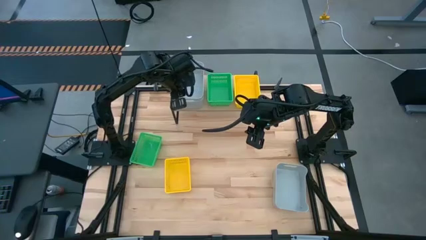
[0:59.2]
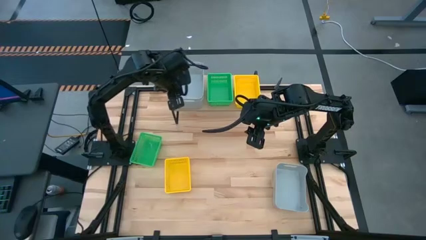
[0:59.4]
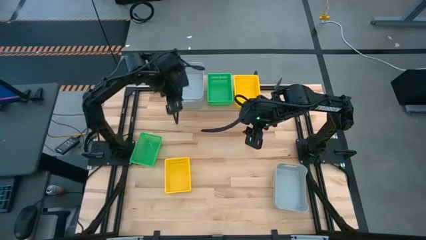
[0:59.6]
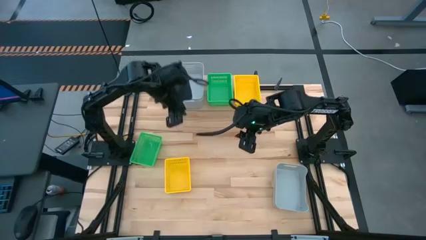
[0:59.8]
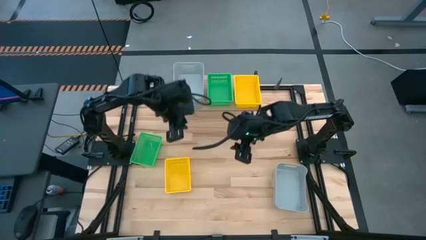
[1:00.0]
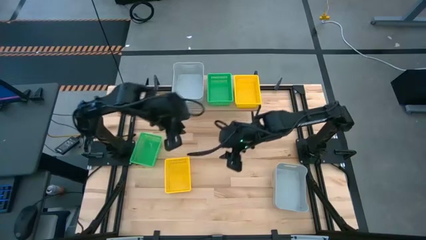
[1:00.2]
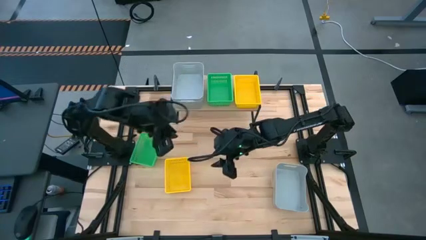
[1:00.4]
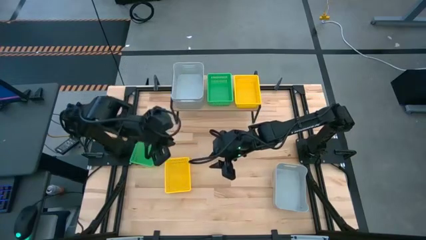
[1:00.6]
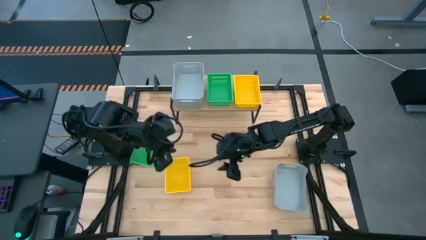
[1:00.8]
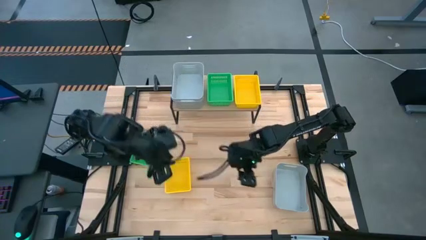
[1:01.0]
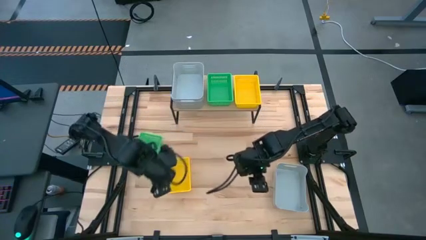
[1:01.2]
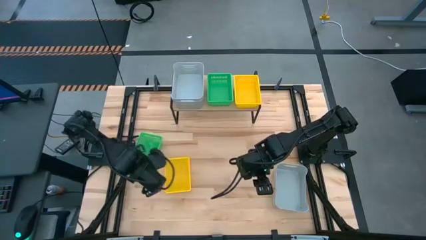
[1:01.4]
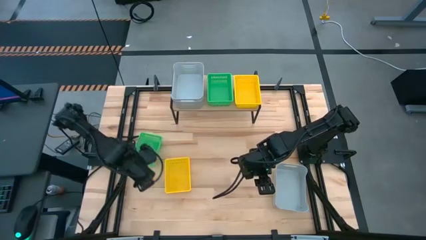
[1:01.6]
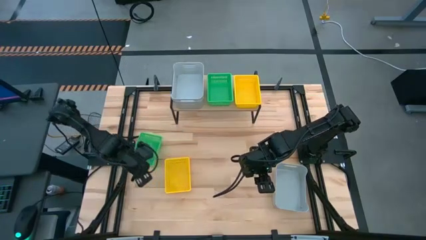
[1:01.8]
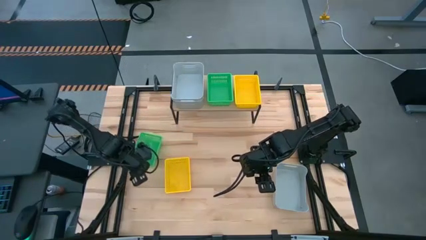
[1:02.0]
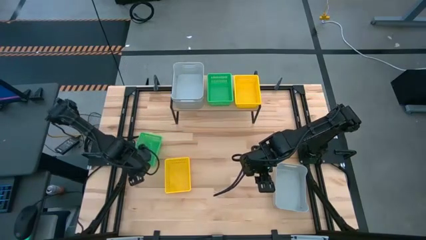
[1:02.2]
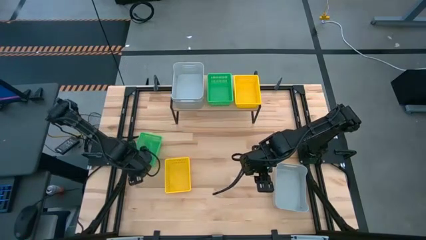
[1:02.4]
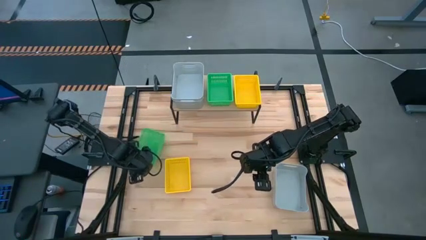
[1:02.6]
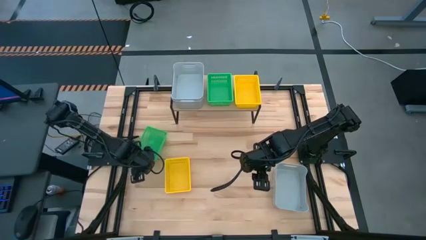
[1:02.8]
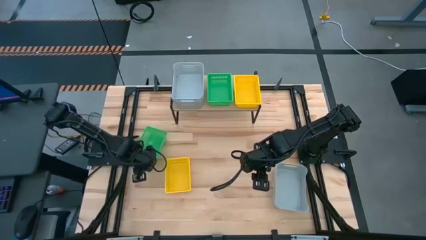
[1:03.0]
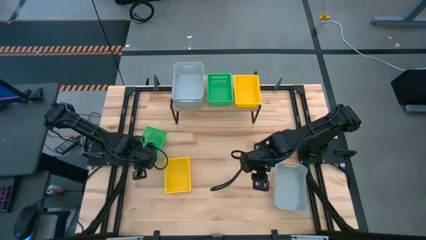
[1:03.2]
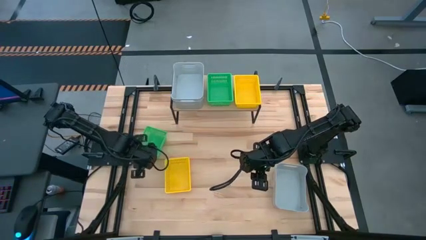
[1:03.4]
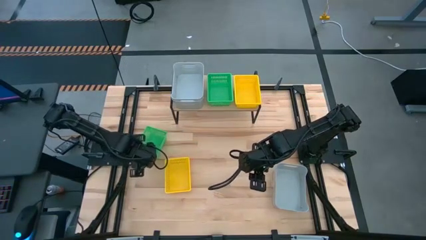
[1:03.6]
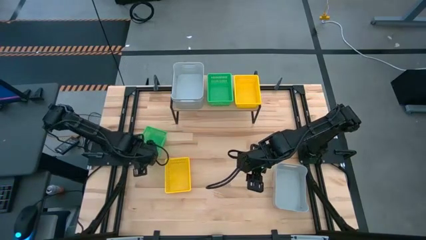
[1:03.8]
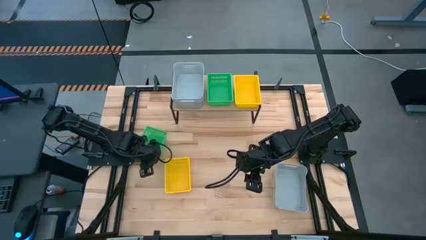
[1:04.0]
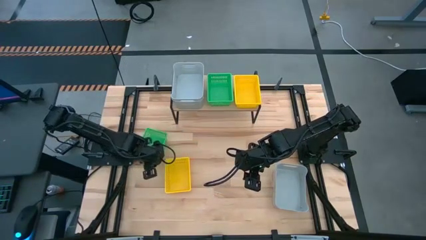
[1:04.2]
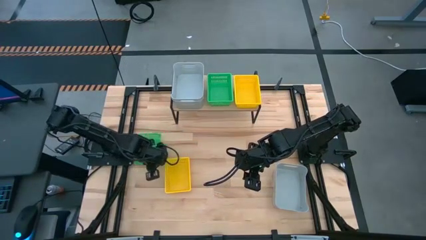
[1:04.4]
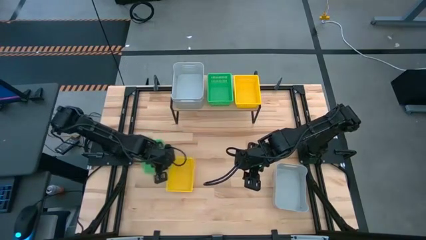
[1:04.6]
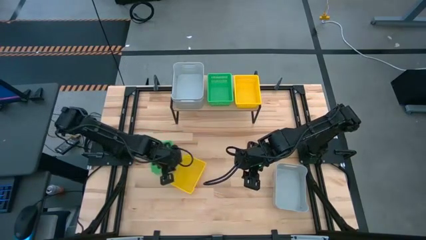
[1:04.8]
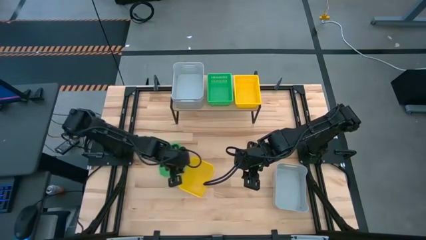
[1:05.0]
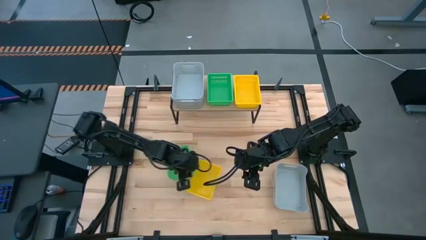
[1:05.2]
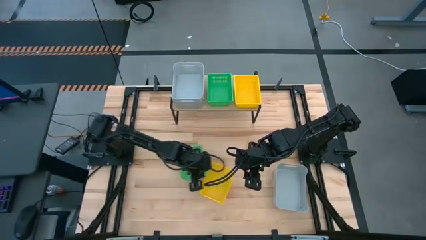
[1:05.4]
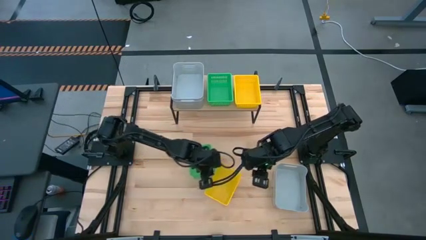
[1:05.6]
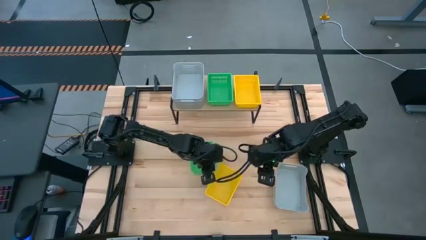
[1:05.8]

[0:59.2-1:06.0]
Task: Stack baskets on shelf by color
Move the green bin to the center of the table

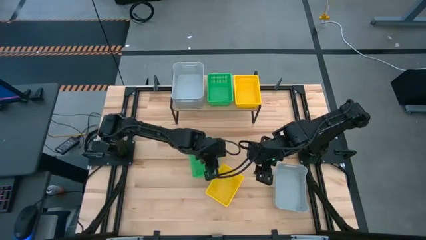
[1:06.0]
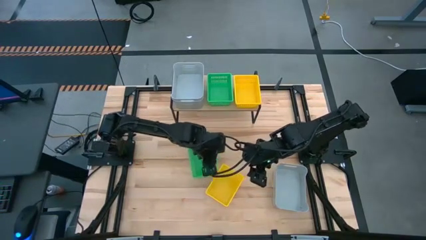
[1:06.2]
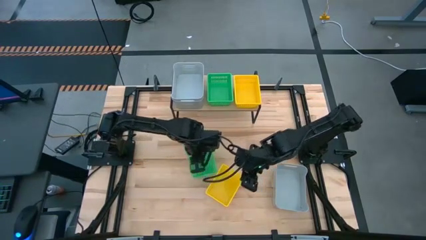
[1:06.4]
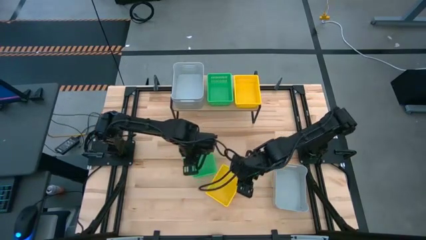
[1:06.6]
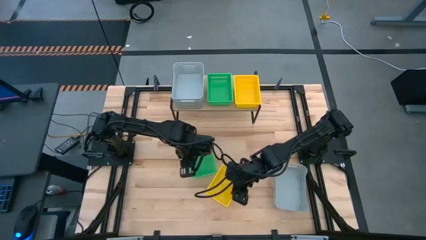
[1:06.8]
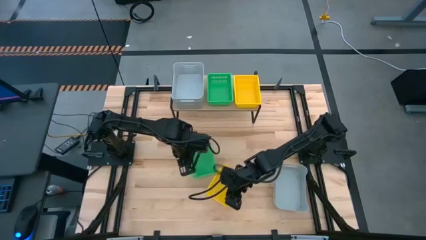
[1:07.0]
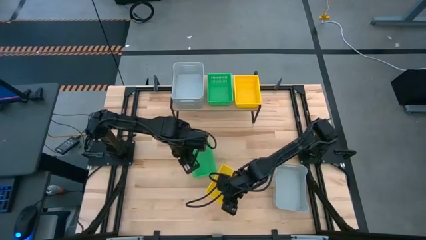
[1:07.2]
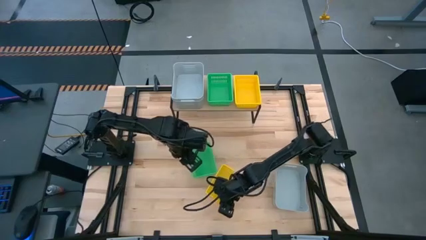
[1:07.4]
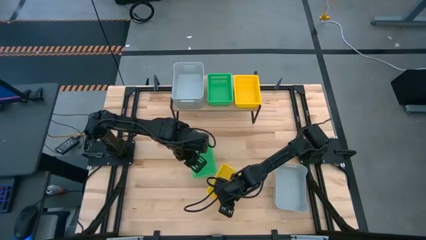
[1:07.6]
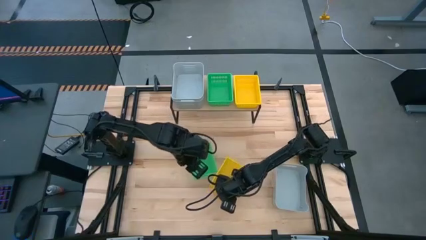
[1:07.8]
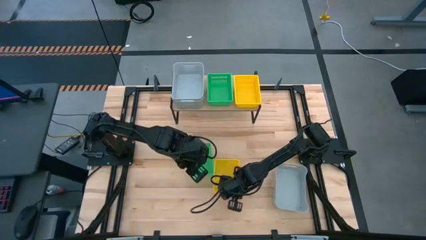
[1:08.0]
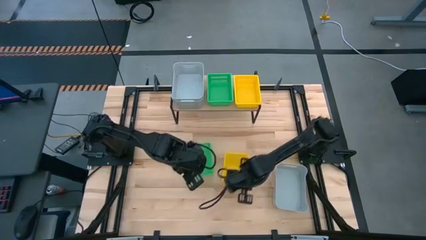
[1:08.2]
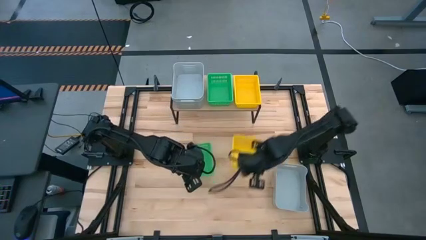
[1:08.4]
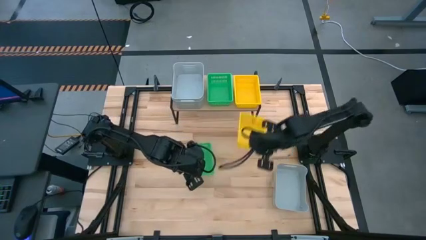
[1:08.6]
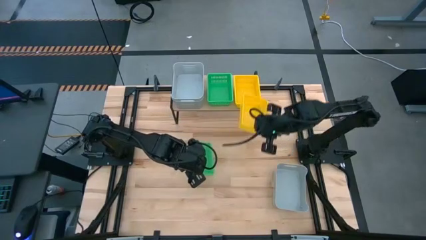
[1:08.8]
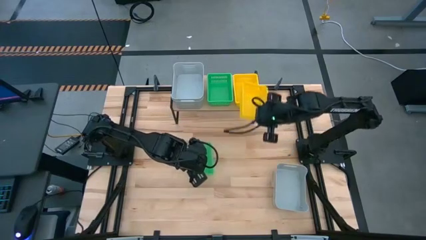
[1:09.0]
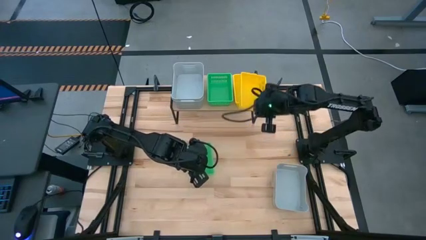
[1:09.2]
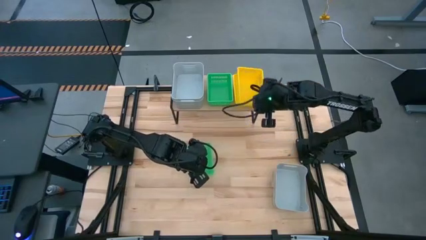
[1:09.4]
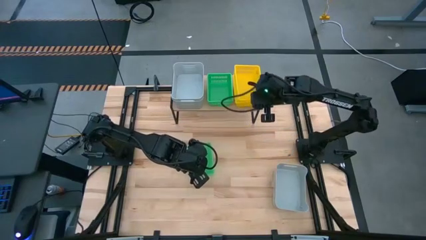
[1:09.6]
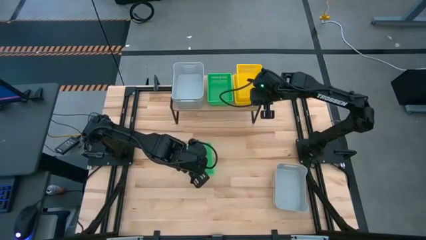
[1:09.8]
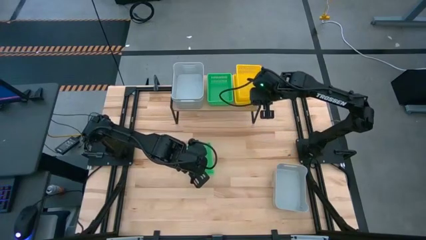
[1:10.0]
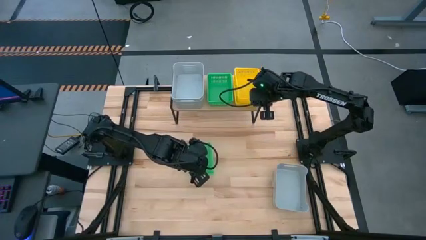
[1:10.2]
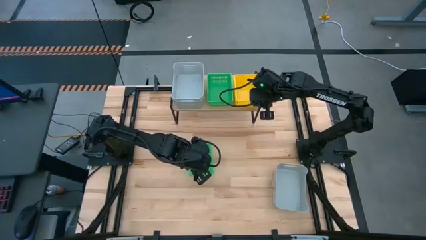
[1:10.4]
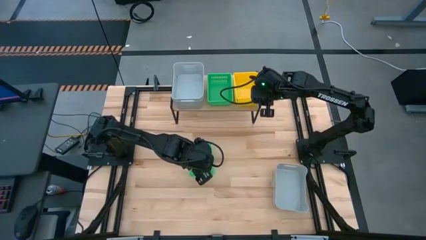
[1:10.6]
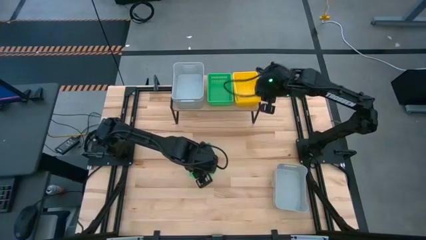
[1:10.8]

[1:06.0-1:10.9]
Stack the yellow bin on top of the yellow bin on the shelf

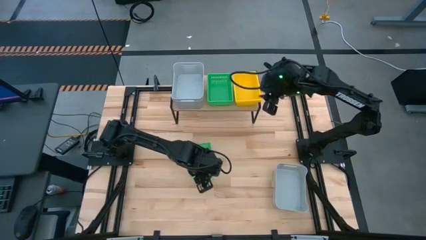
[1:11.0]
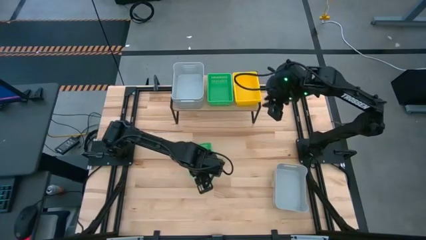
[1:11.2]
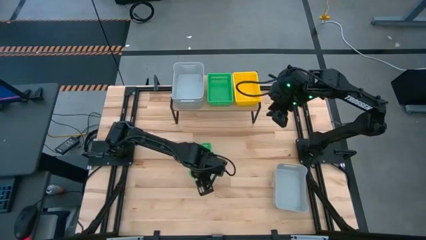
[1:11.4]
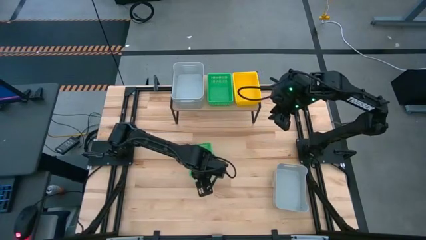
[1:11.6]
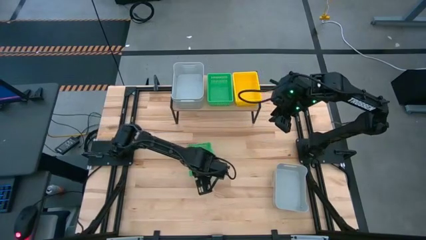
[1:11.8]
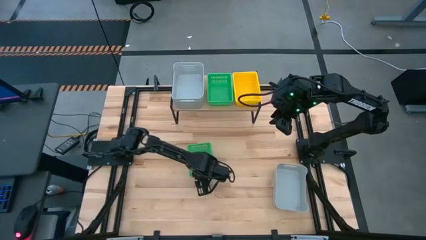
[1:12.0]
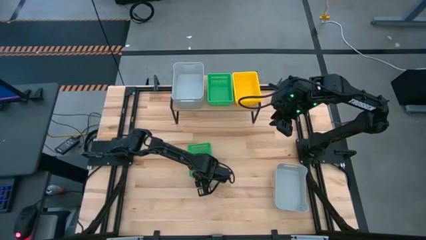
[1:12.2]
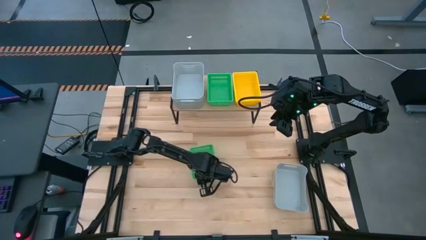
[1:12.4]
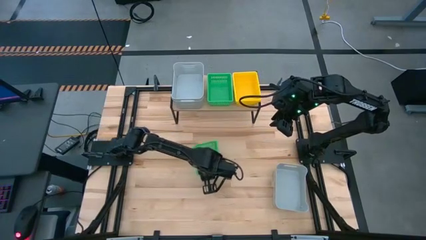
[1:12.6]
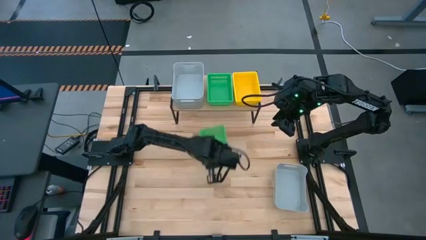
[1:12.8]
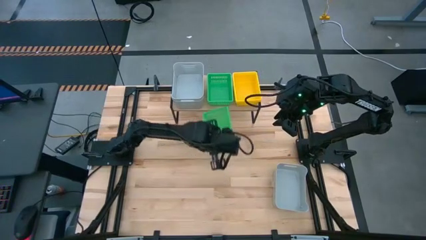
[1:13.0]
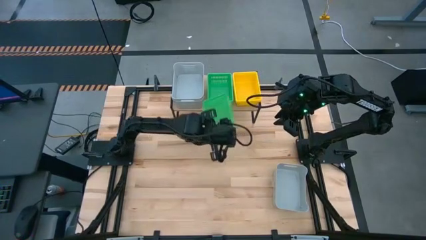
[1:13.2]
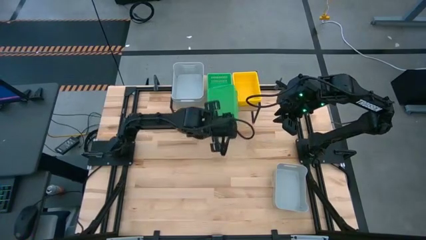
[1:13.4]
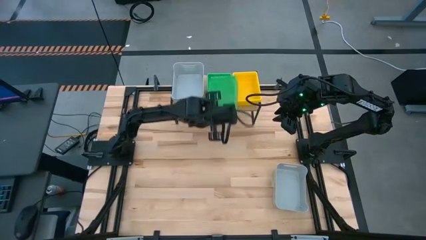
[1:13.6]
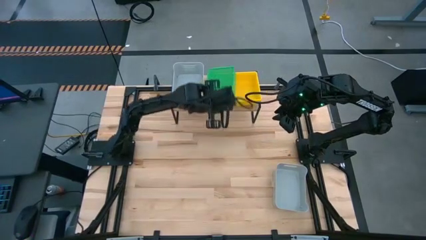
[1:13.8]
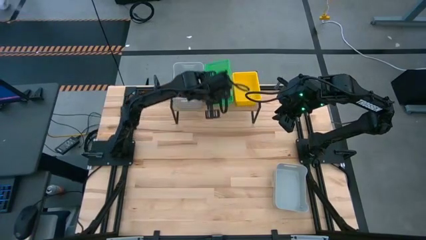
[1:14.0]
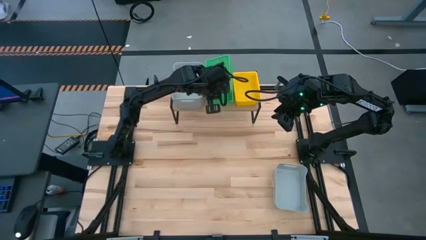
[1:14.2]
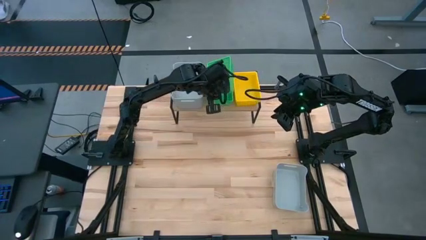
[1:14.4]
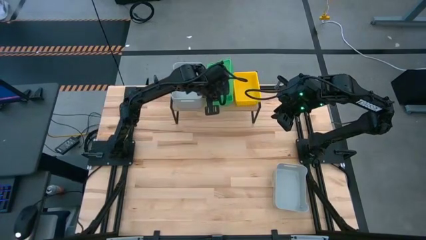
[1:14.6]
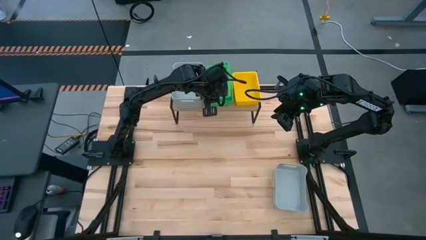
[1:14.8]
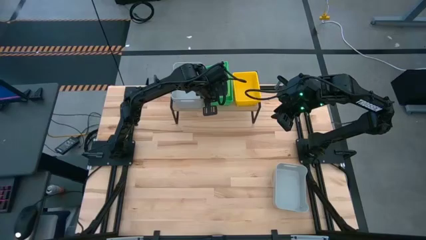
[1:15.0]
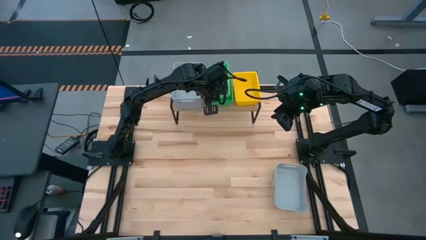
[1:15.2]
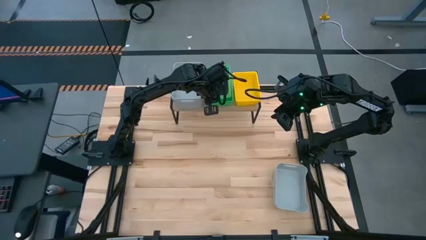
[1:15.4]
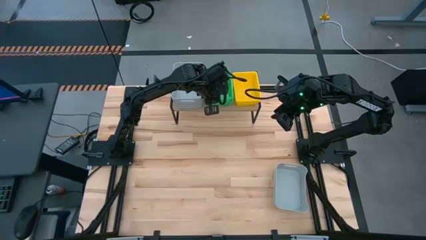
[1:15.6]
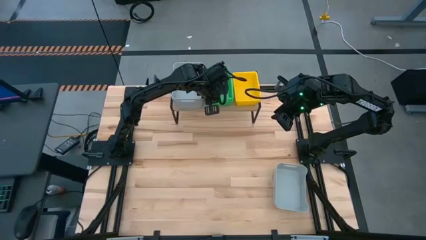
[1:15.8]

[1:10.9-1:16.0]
Stack the green bin on top of the green bin on the shelf
